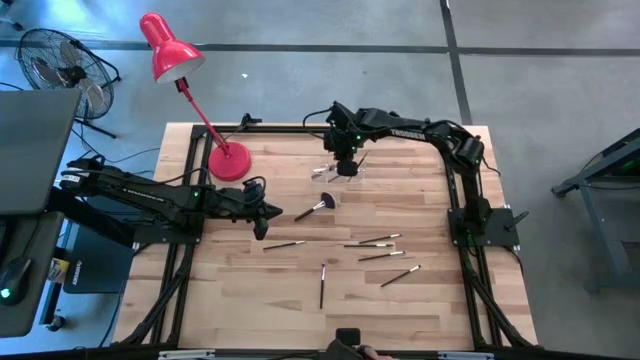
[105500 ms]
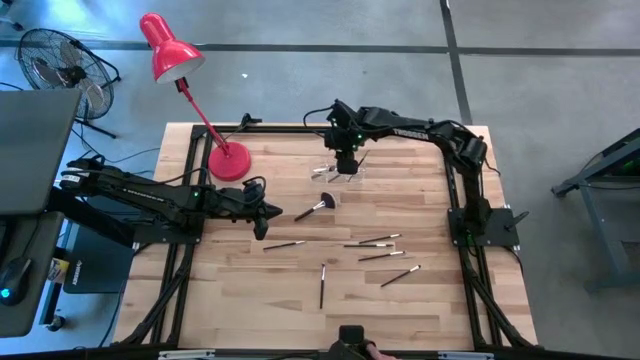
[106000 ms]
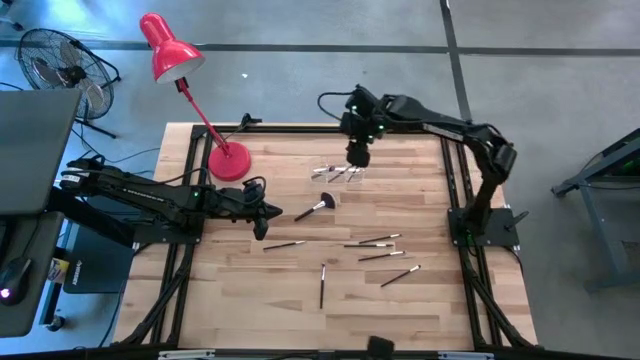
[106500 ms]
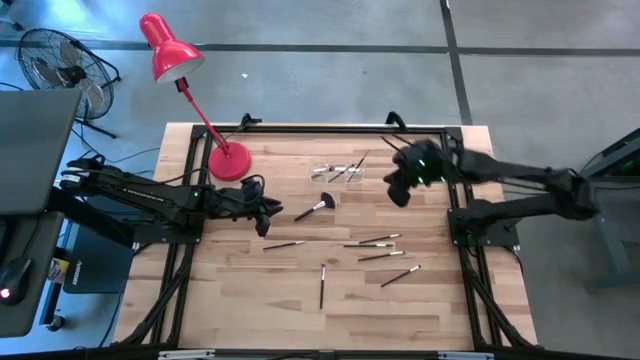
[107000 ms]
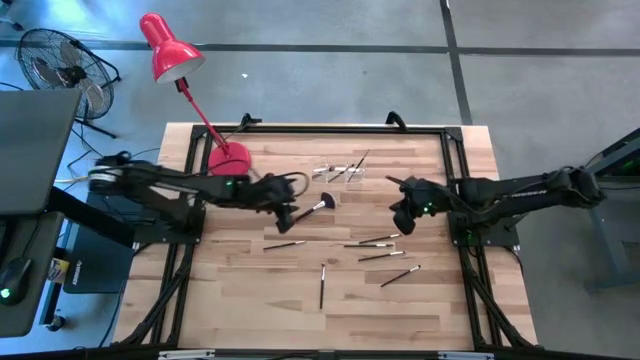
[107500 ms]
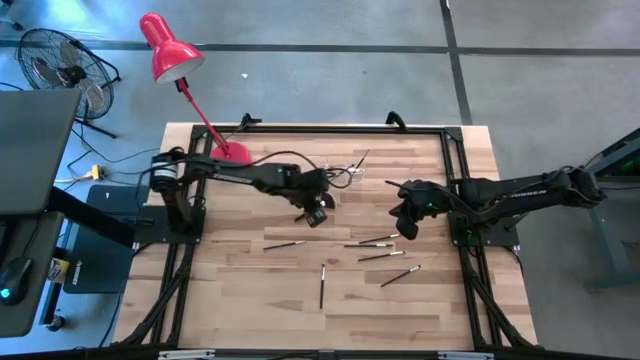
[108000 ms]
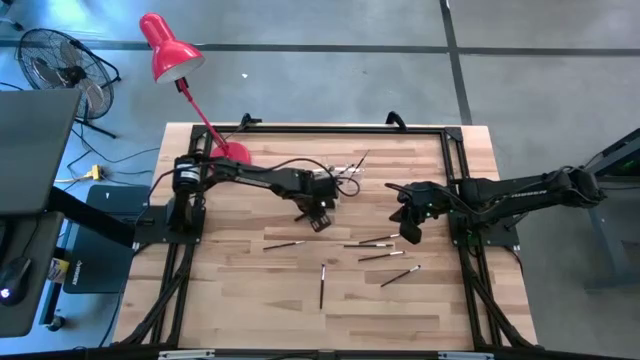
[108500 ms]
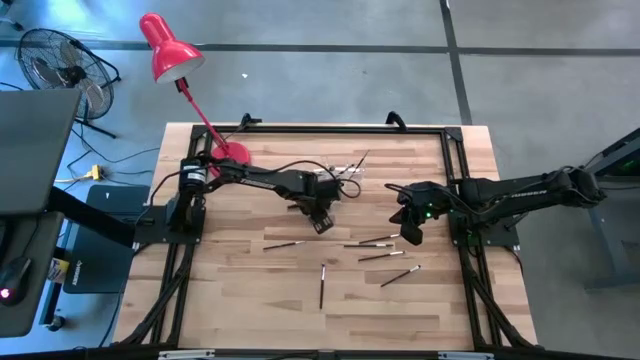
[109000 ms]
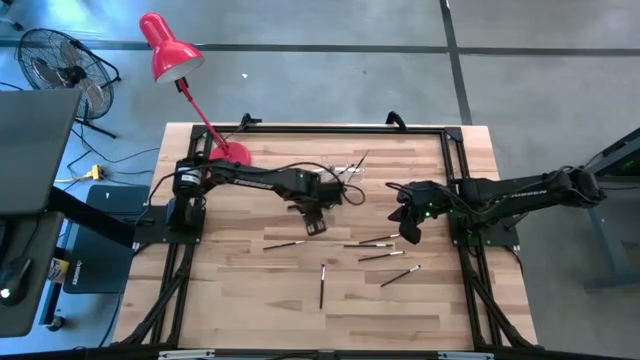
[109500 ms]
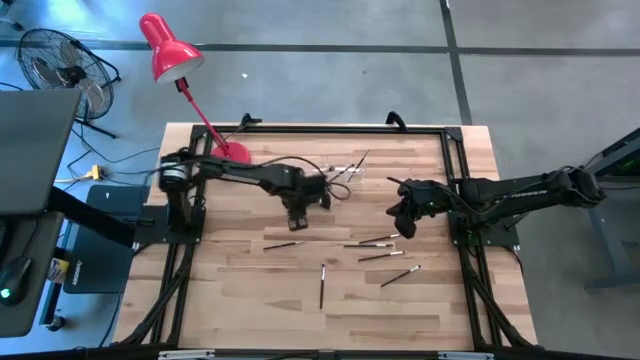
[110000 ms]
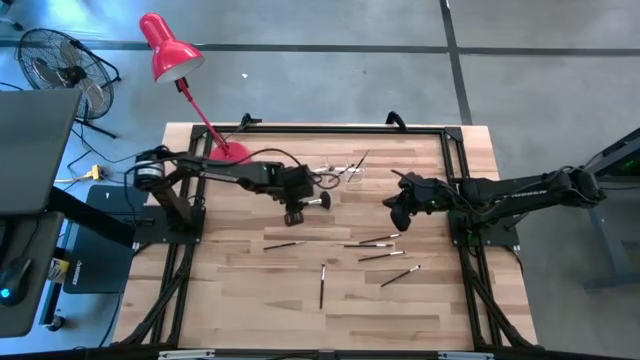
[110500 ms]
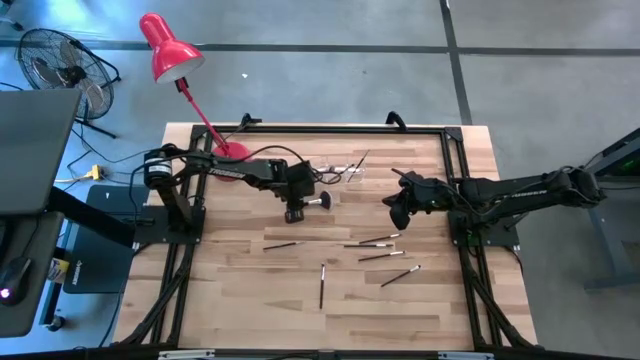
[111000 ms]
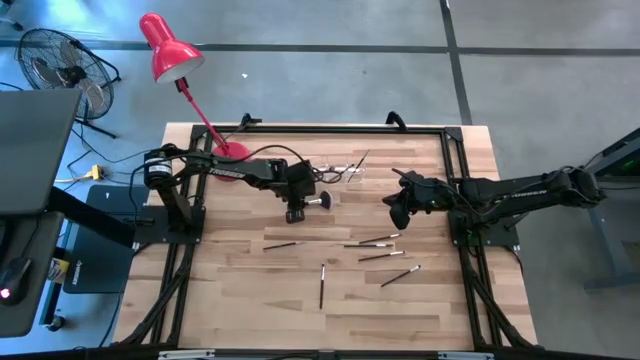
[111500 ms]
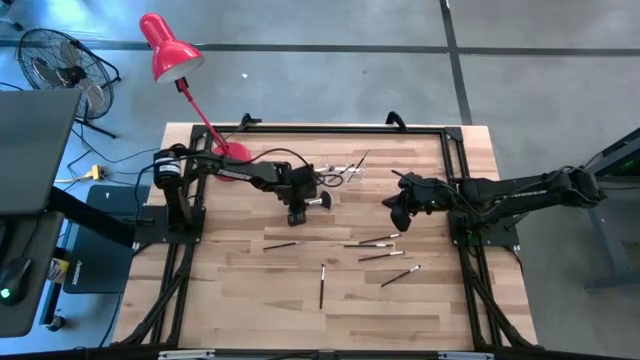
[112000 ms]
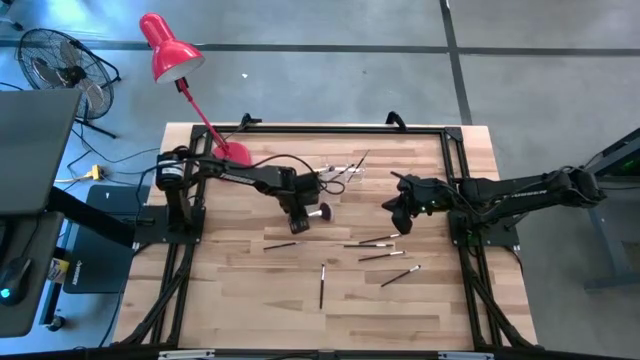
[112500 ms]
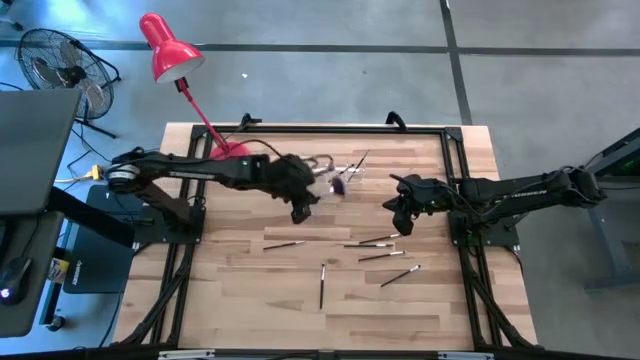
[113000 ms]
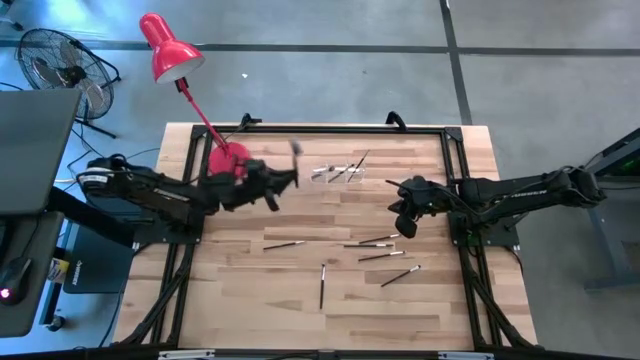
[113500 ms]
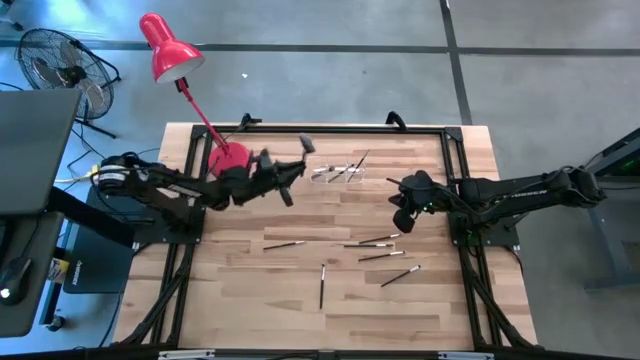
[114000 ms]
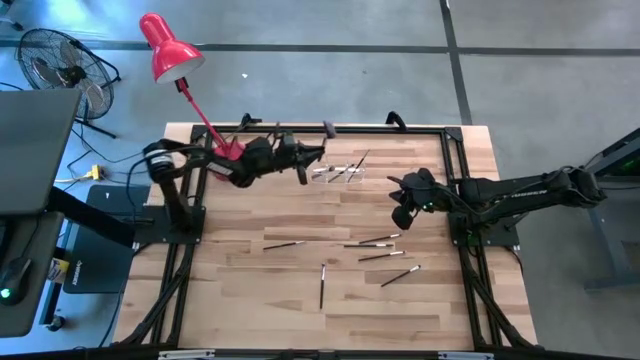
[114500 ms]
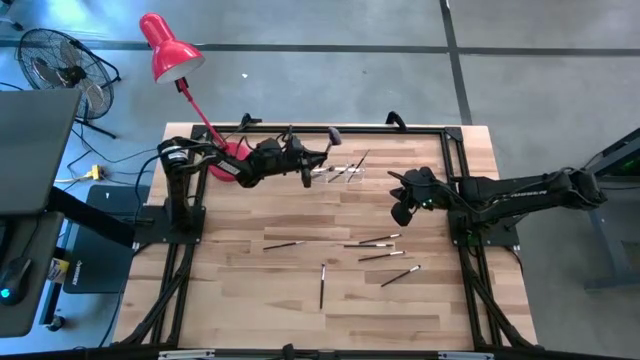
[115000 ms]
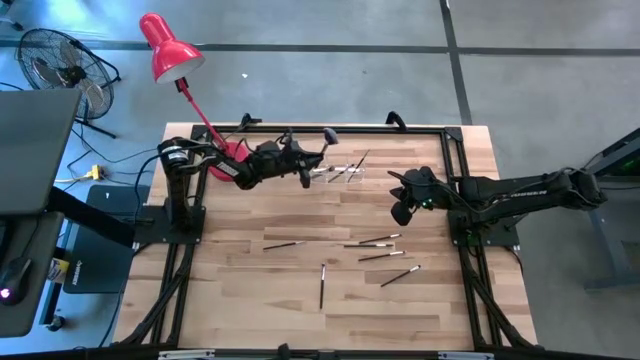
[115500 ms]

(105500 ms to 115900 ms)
Task: Put items in baskets/containers
Put the highlighter brush into the transparent organizer

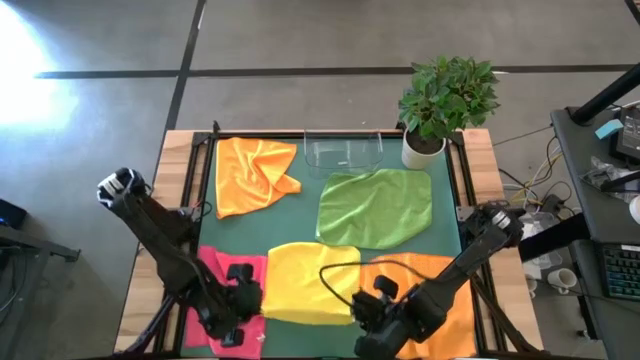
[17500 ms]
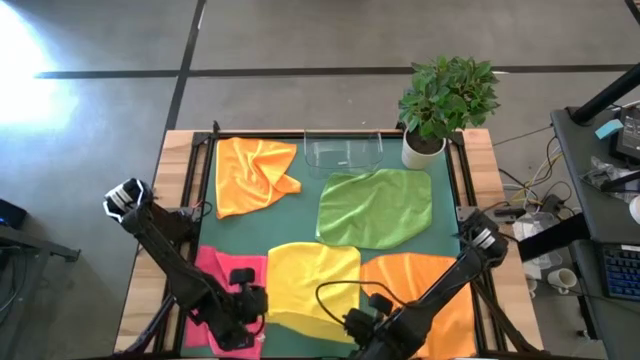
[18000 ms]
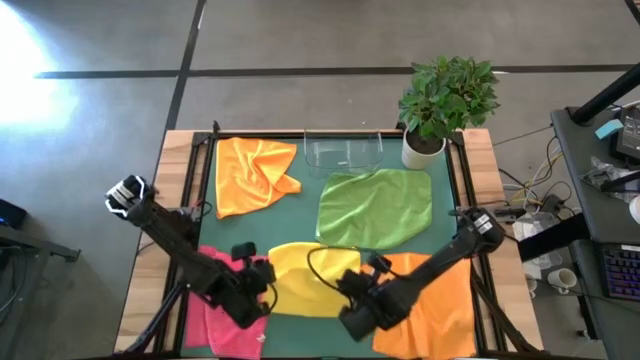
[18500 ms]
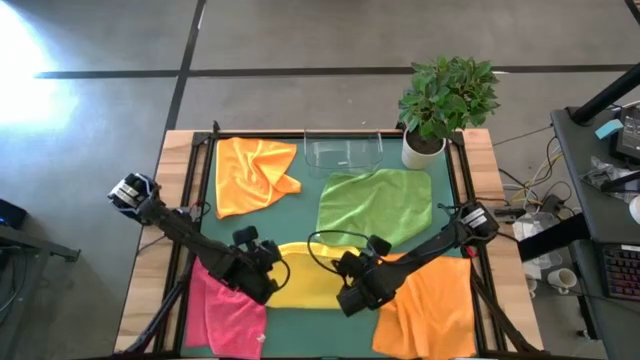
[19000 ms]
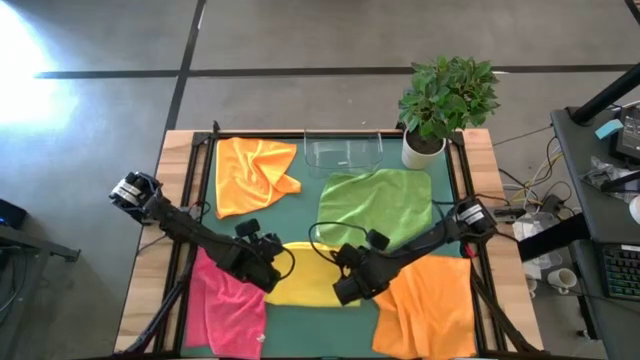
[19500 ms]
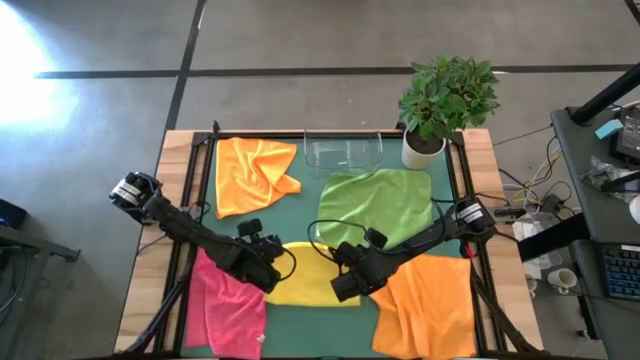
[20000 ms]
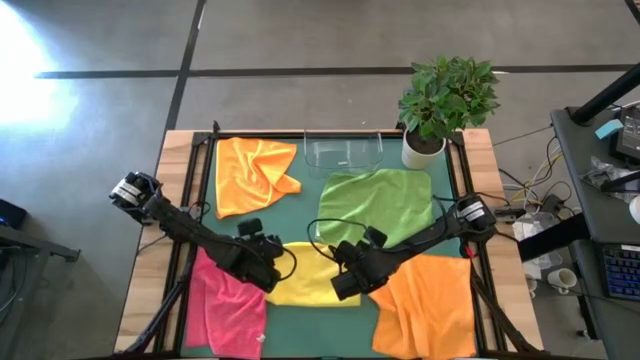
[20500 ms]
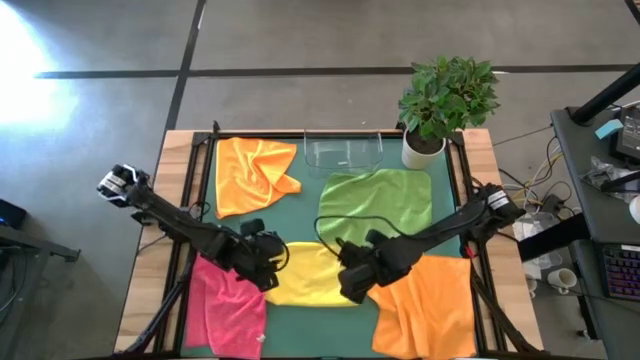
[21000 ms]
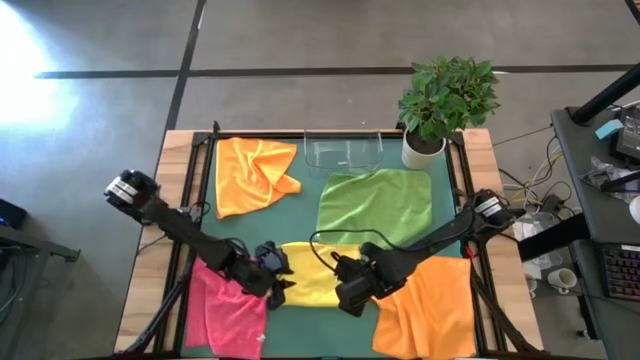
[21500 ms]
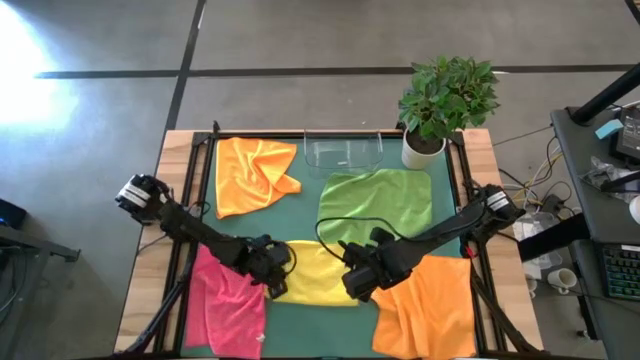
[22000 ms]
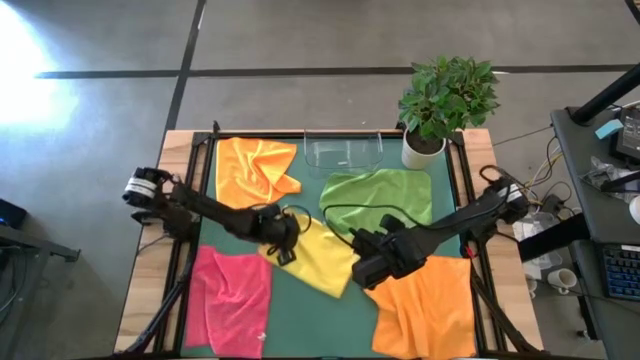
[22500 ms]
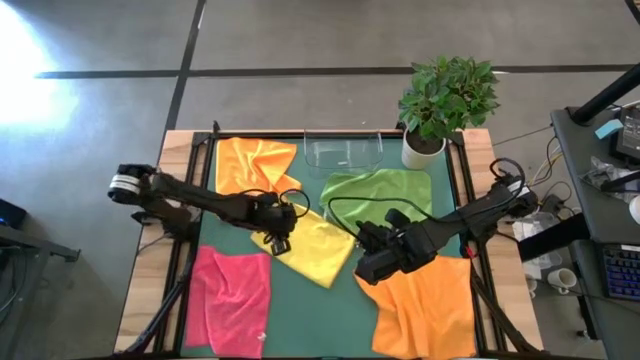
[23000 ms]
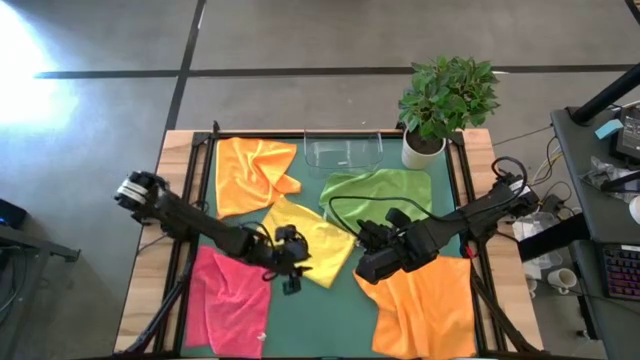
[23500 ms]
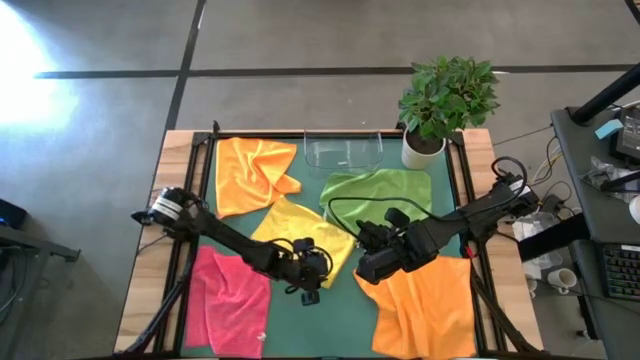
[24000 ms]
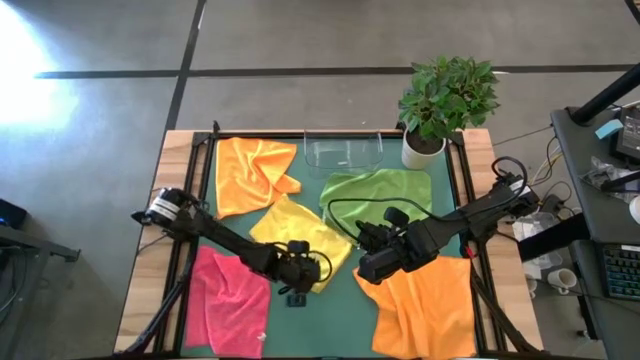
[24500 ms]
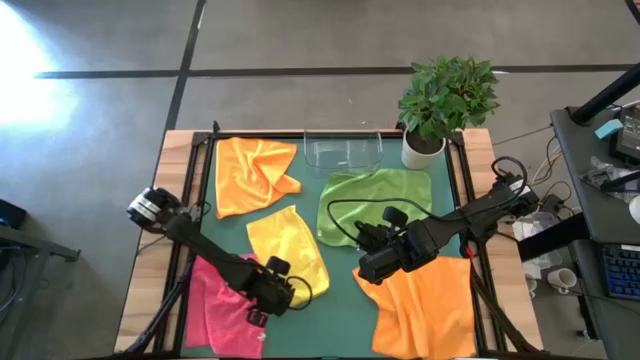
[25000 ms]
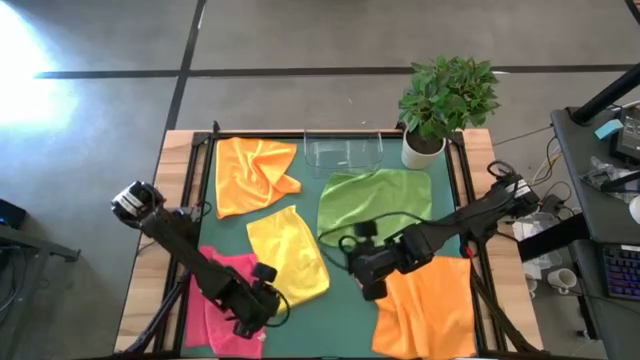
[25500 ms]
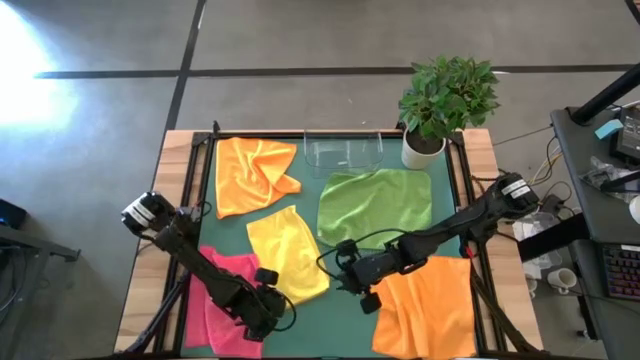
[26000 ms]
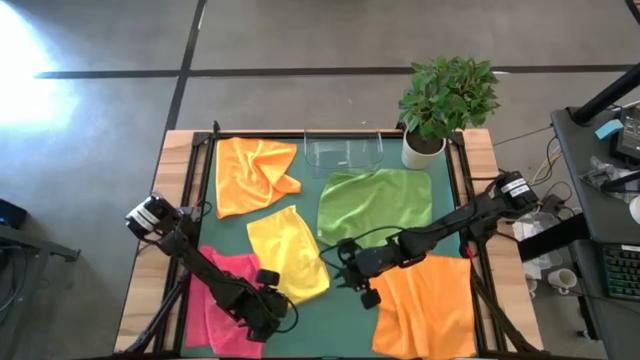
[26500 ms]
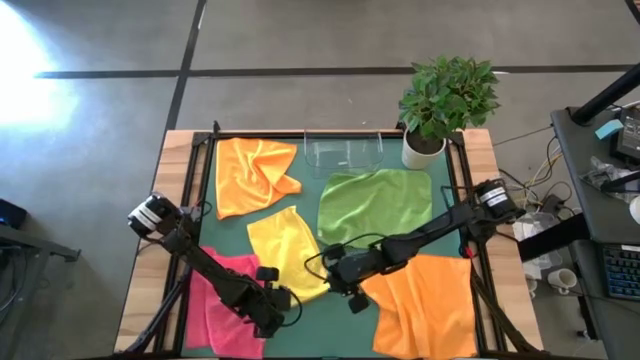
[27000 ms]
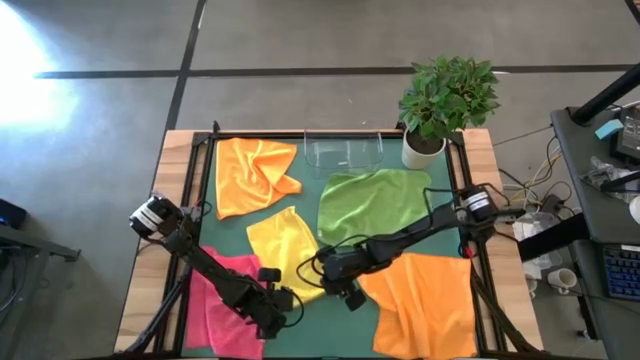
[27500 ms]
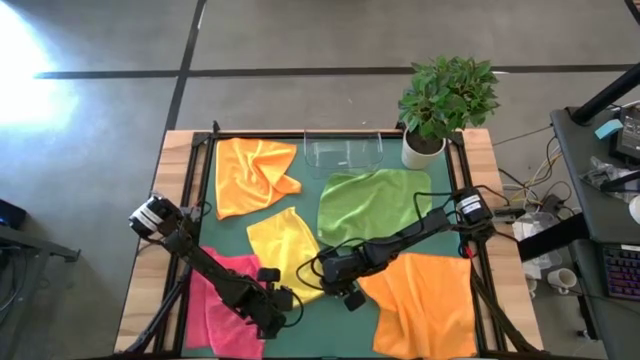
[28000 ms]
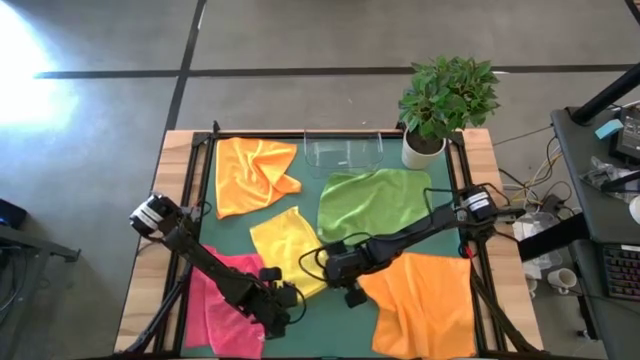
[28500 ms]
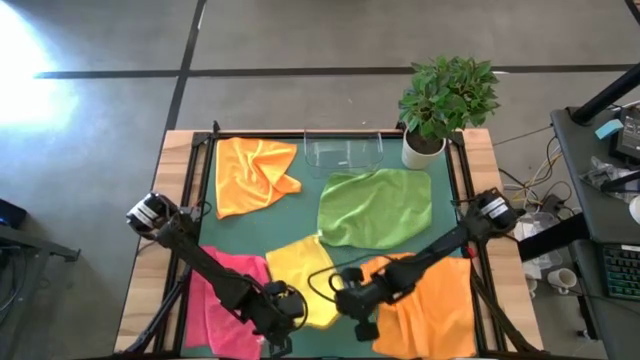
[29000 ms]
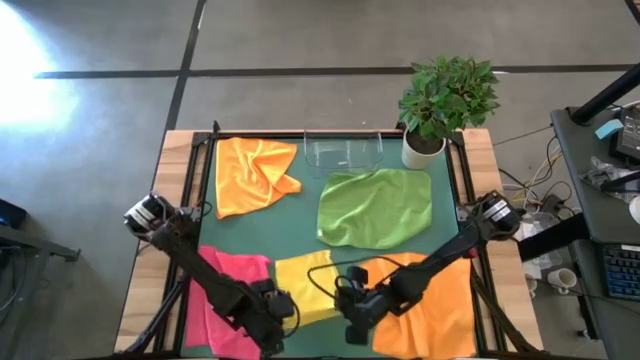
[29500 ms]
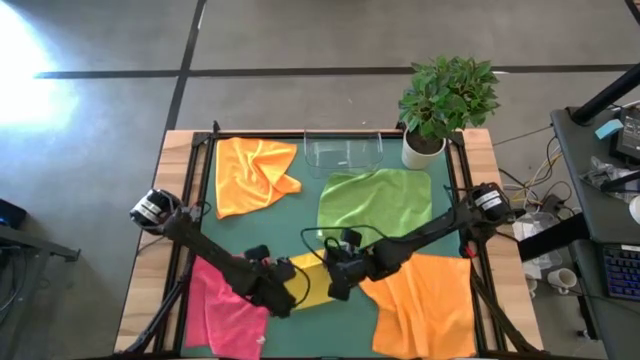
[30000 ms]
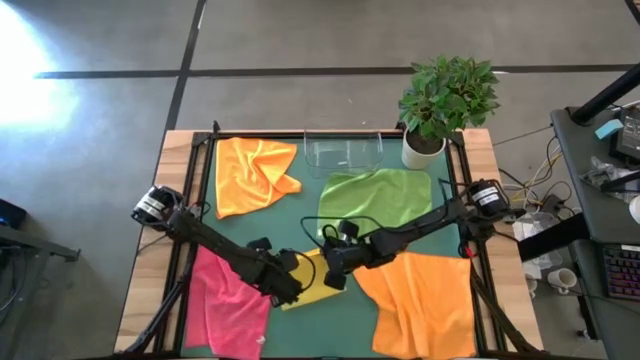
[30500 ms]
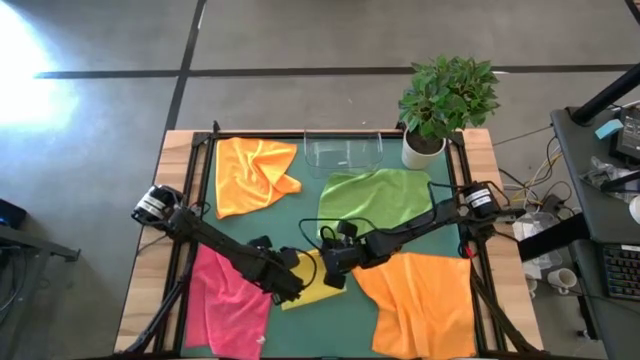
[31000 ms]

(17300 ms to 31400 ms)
Task: Fold microfiber towels
Fold the yellow towel
